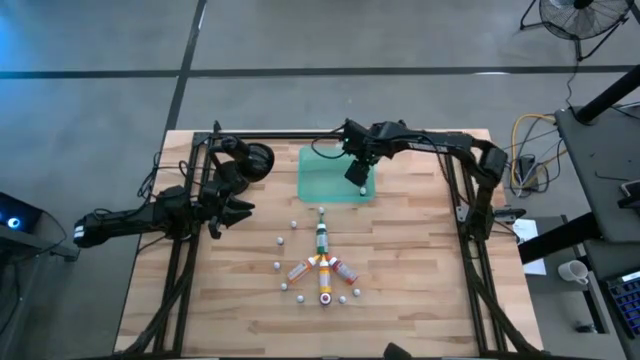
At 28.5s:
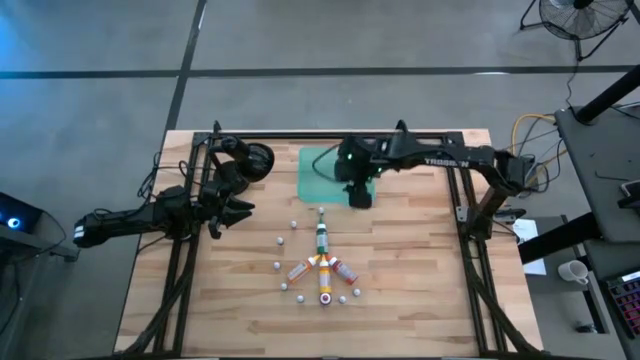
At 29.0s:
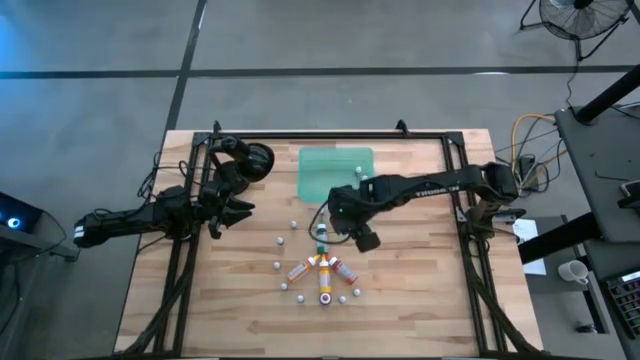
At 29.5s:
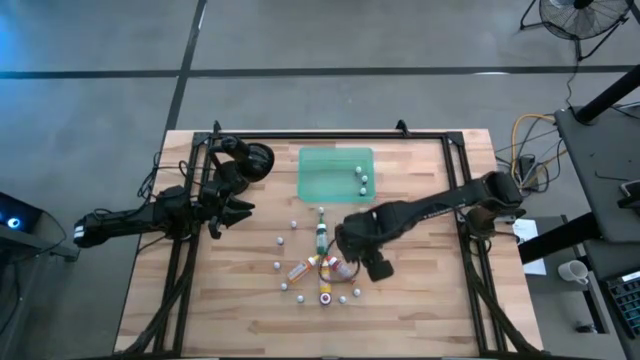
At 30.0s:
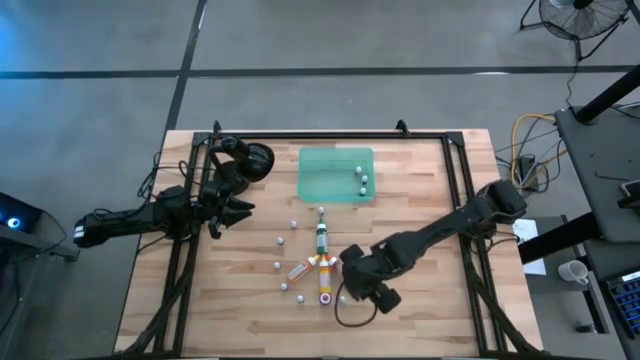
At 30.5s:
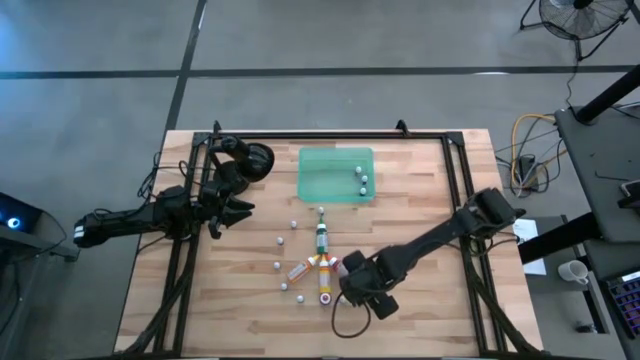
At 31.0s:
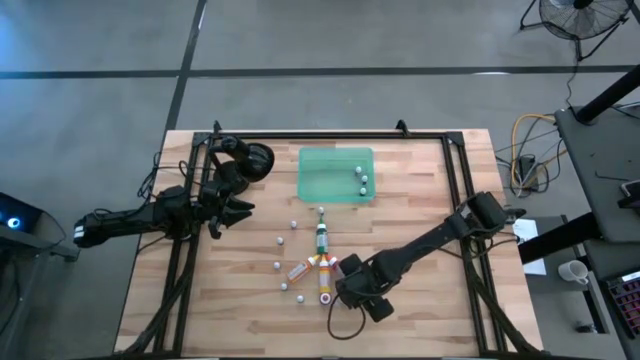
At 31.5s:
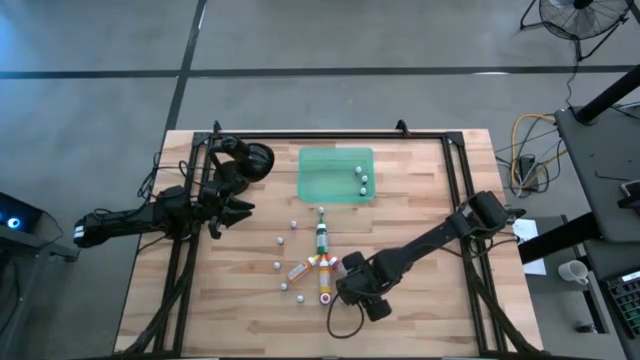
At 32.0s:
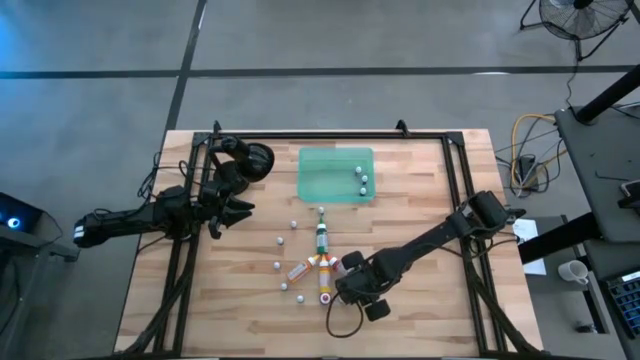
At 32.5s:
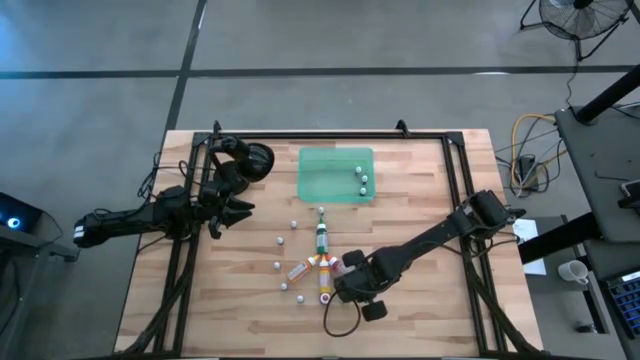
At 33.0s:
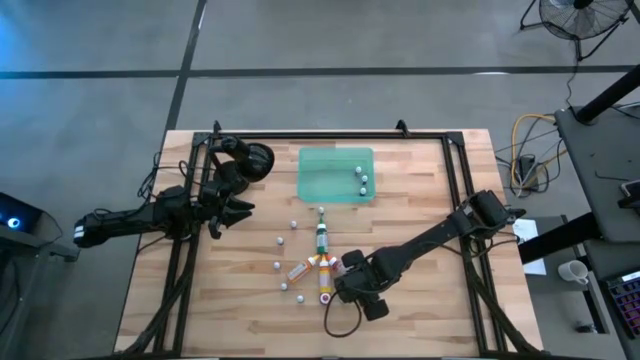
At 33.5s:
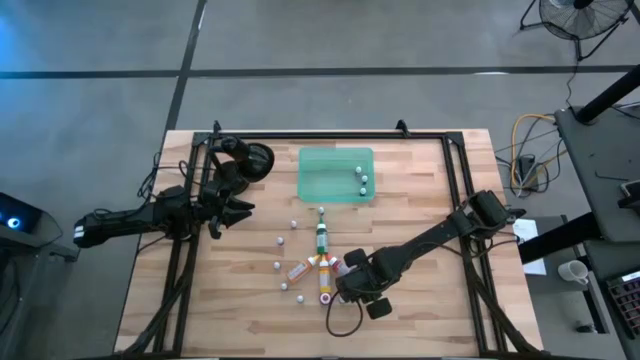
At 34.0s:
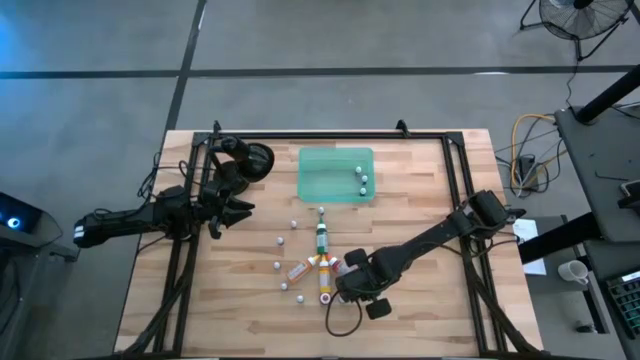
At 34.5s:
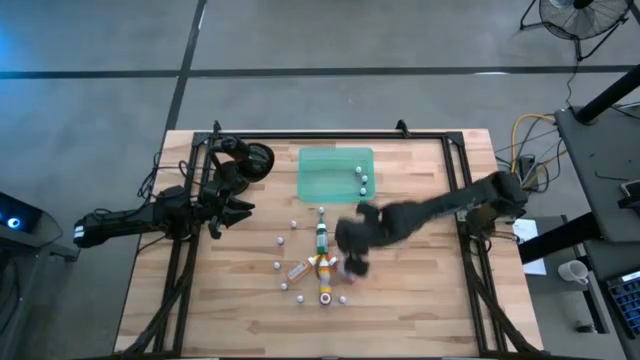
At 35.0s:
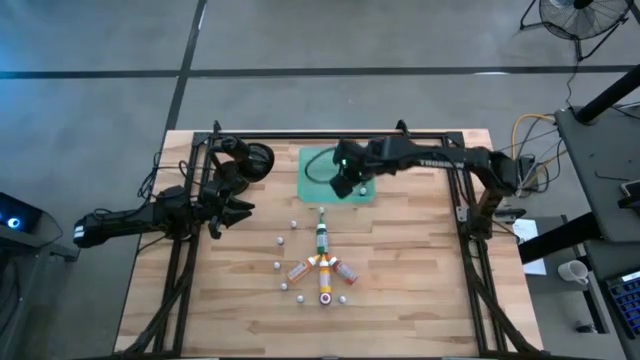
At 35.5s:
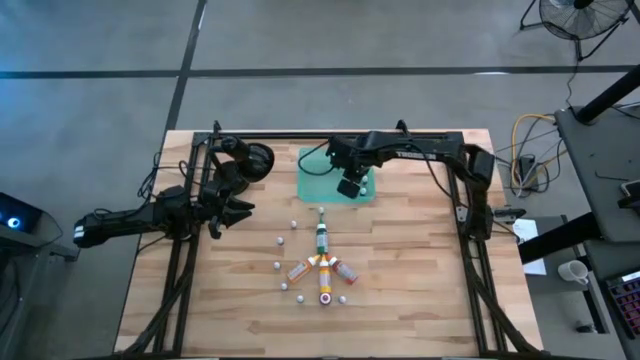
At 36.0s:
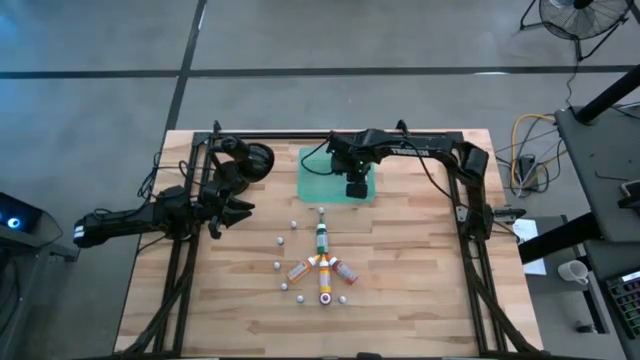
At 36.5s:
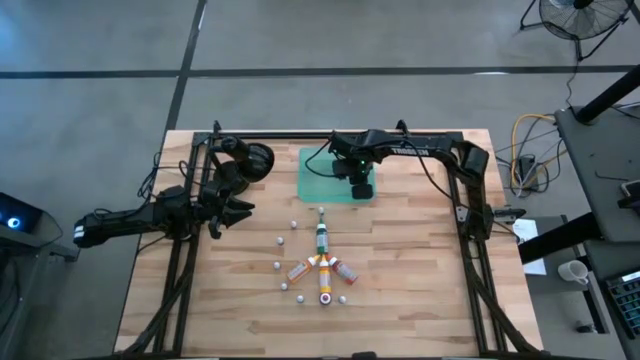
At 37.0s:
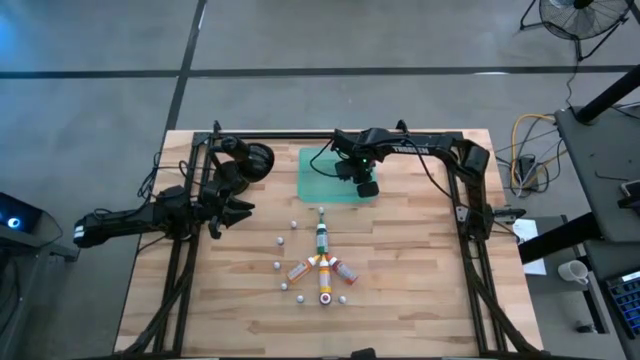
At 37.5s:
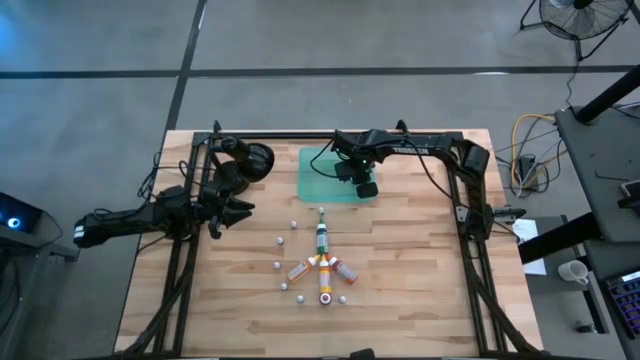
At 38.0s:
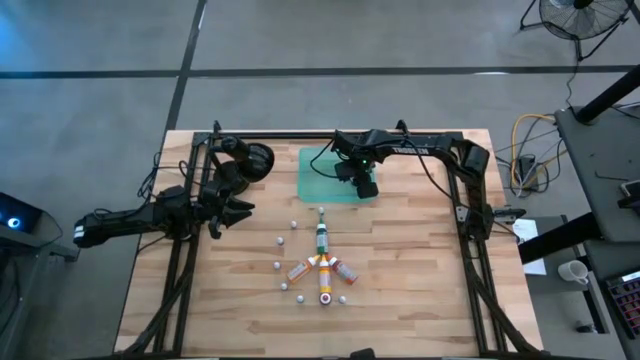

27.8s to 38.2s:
Task: Pick & Place food coloring
Put the bottom right small green food coloring bottle into the bin

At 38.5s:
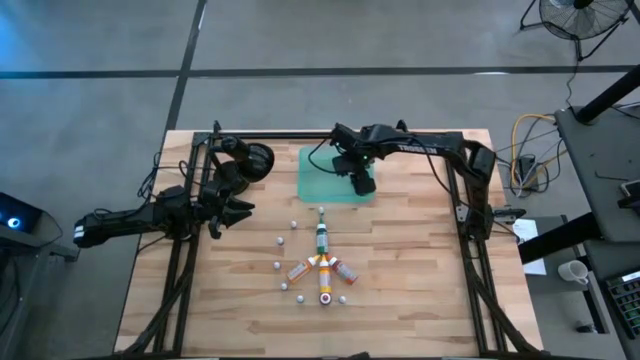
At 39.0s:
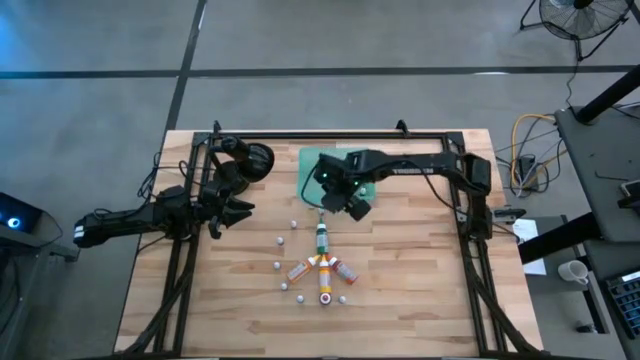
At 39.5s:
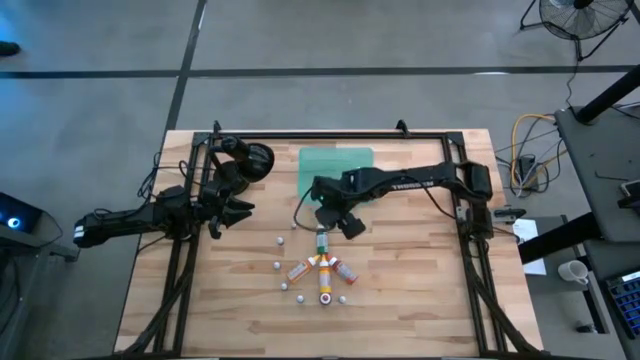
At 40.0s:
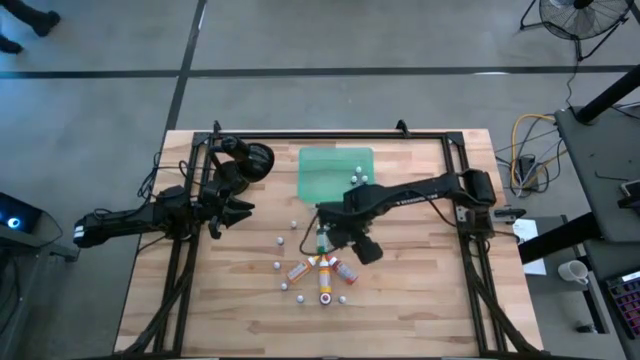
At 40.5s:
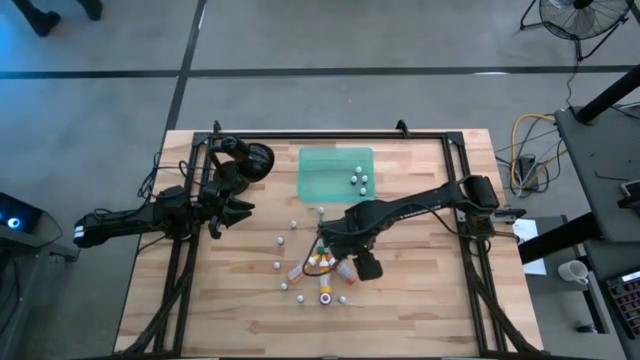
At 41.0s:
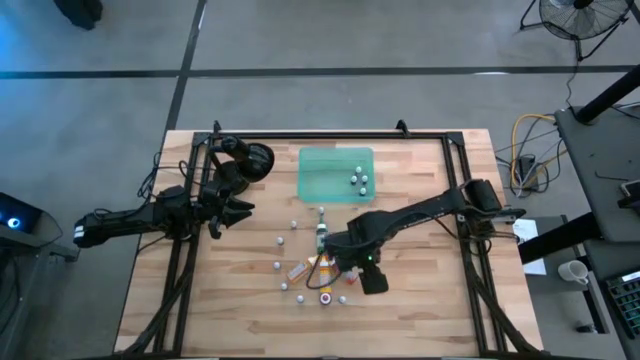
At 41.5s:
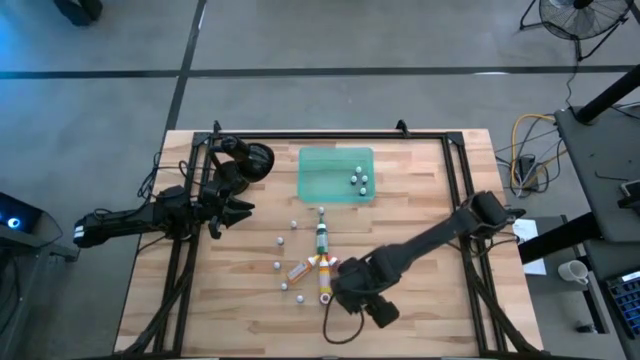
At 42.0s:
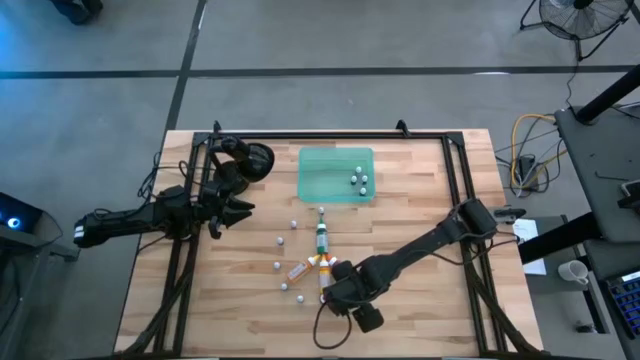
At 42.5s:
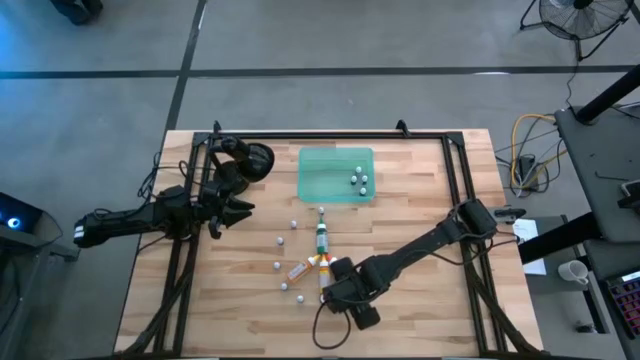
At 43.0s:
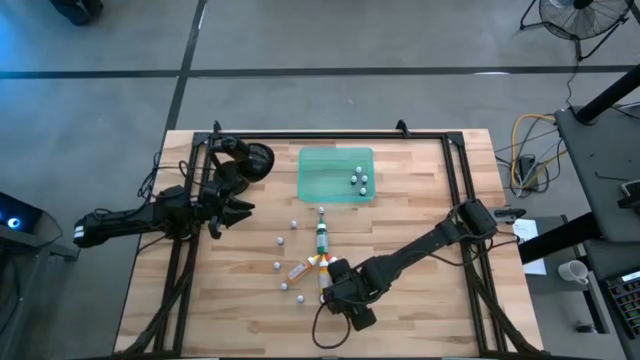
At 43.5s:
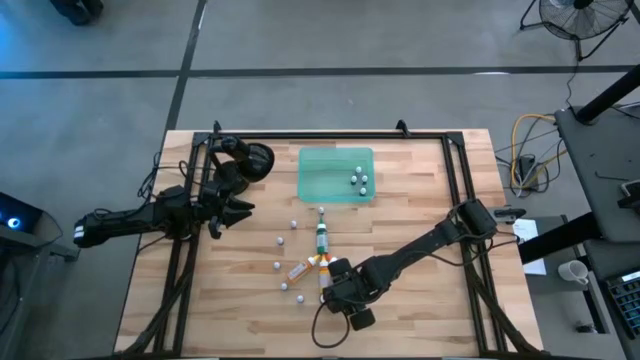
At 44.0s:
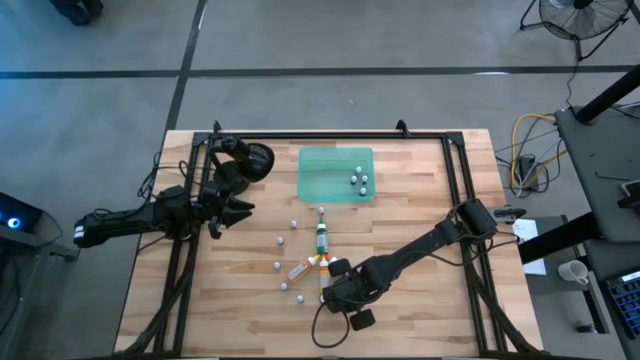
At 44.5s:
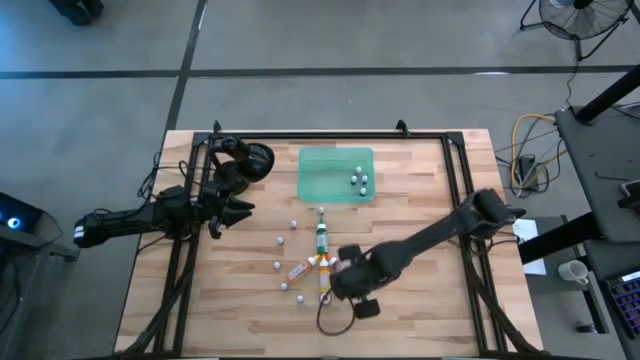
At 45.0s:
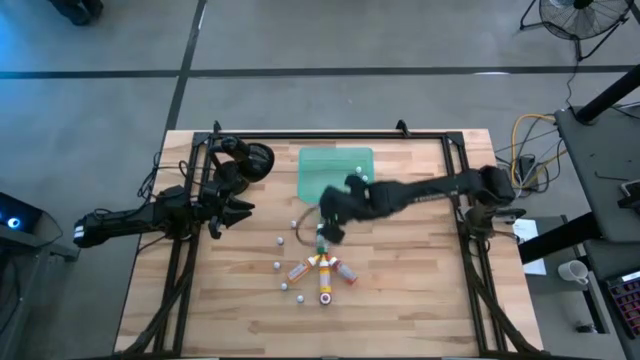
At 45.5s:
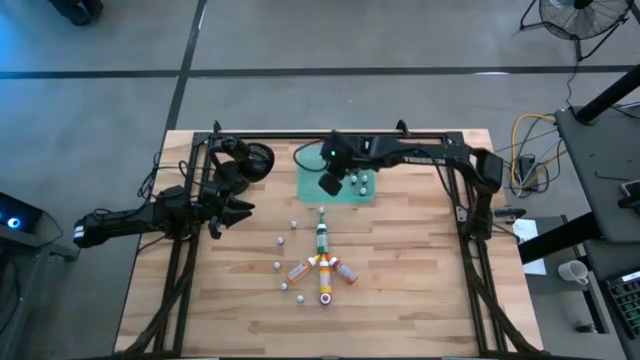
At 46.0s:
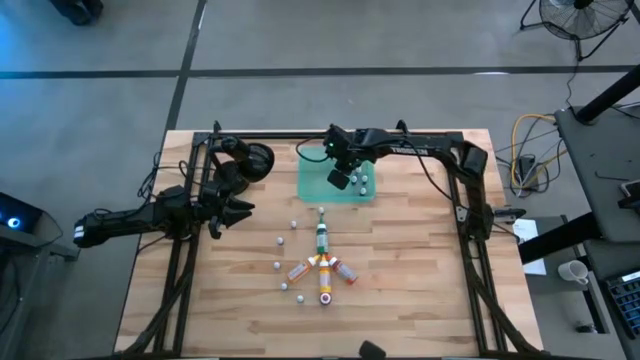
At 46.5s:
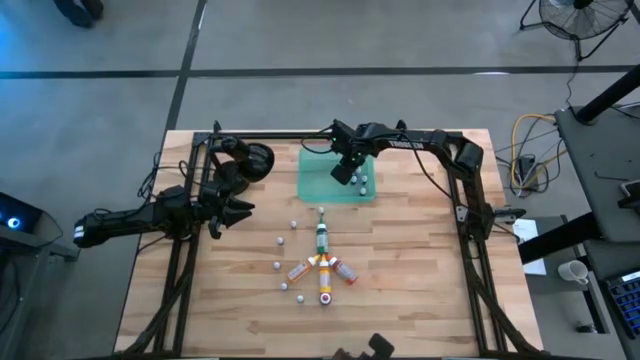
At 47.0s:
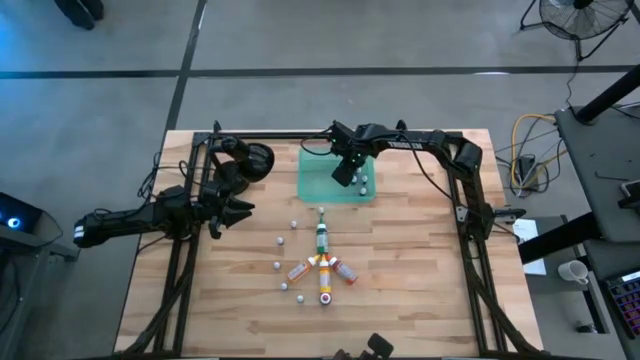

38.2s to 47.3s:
Put the bottom center small green food coloring bottle into the bin

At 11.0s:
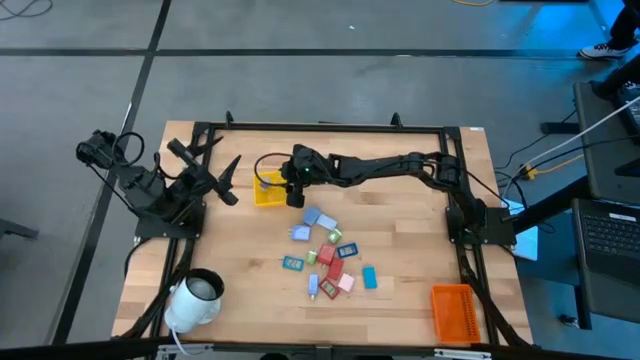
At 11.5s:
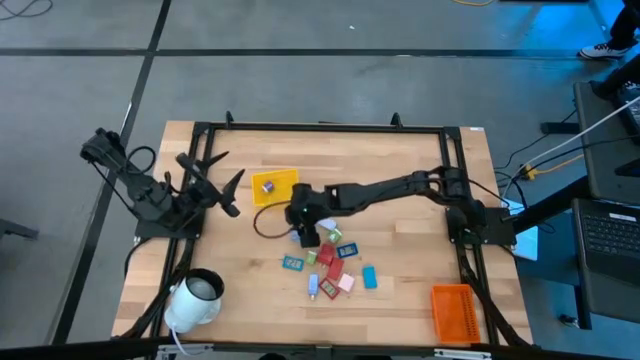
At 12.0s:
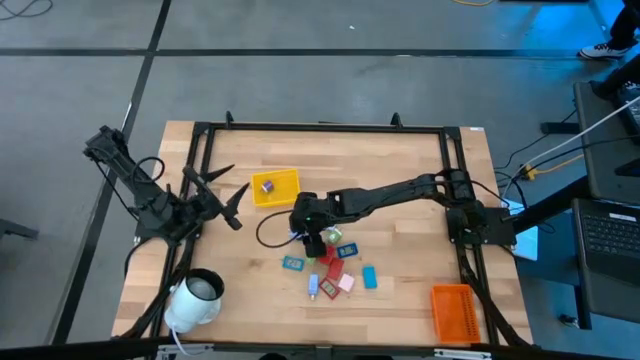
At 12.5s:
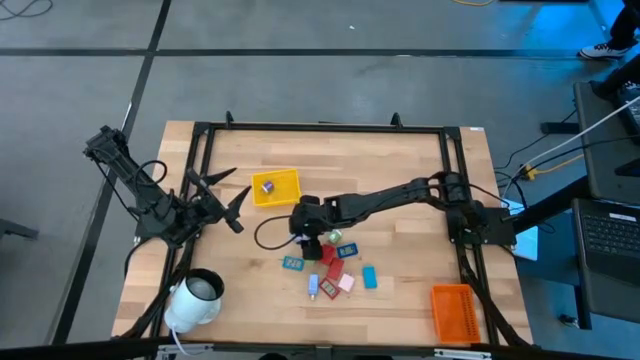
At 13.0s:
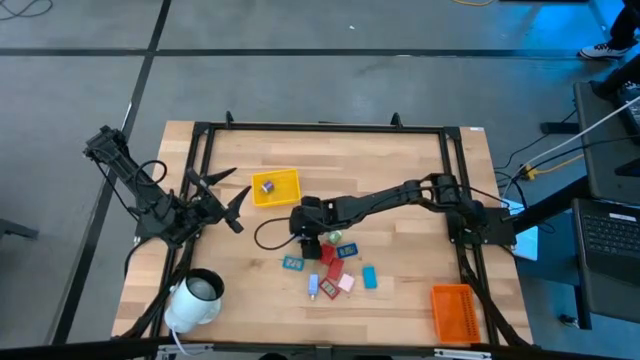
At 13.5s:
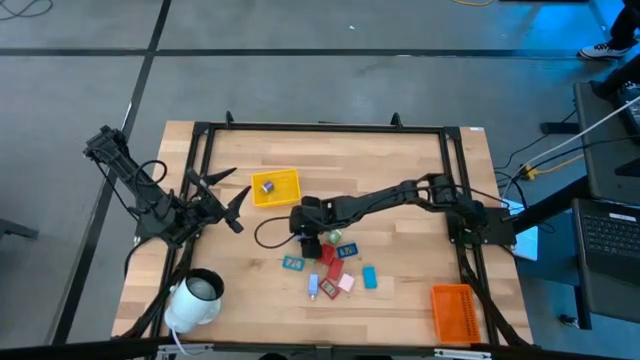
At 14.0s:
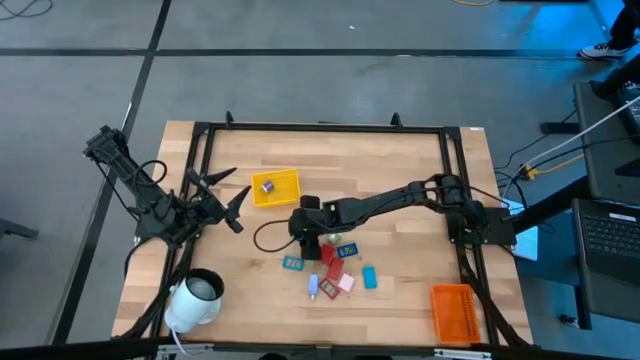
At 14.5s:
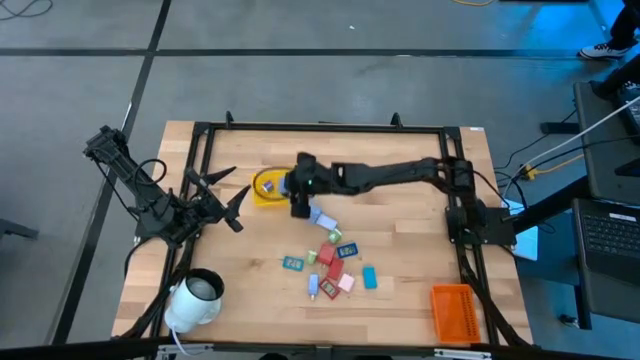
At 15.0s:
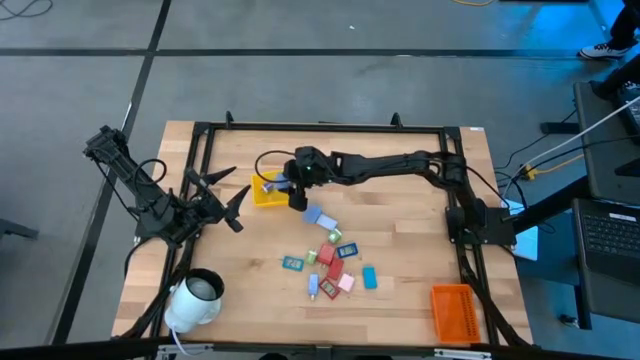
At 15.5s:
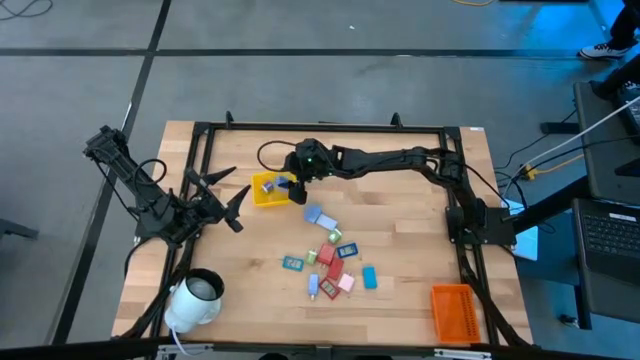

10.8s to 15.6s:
Task: Pick & Place Office items
Put the middle light blue charger adapter into the yellow bin
